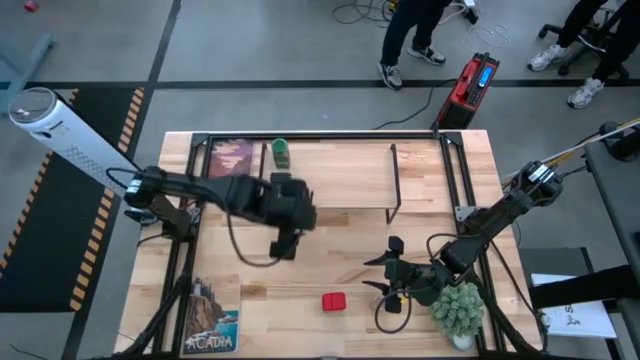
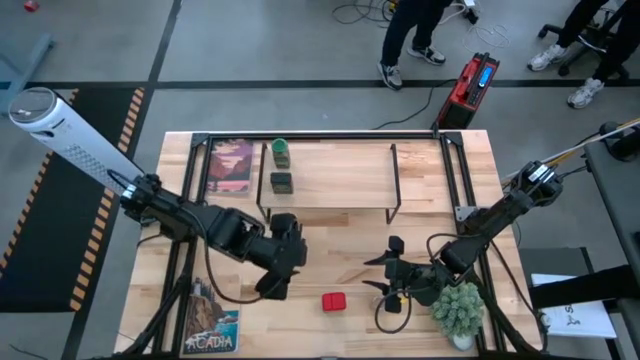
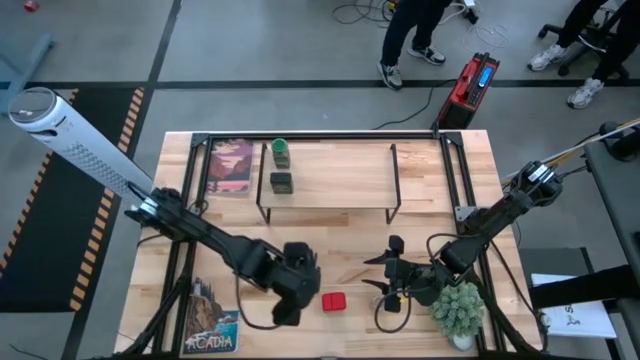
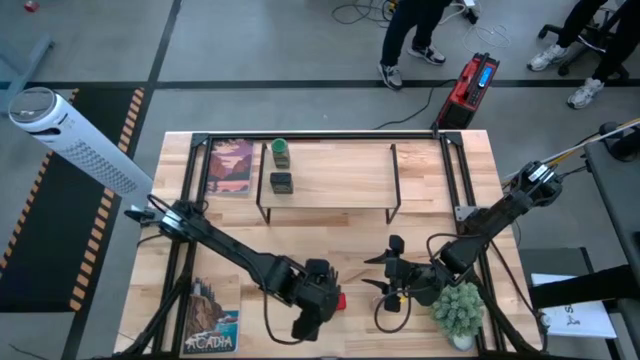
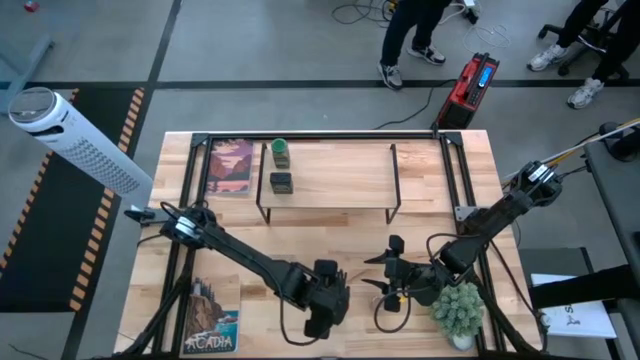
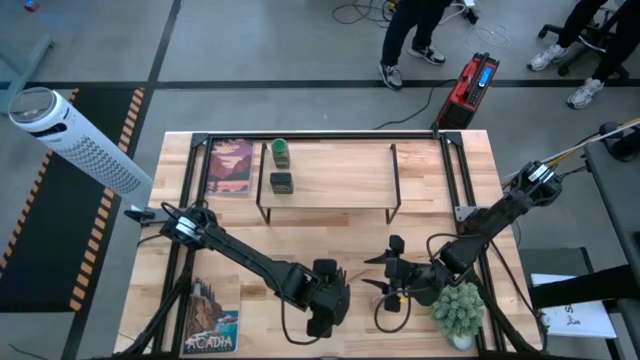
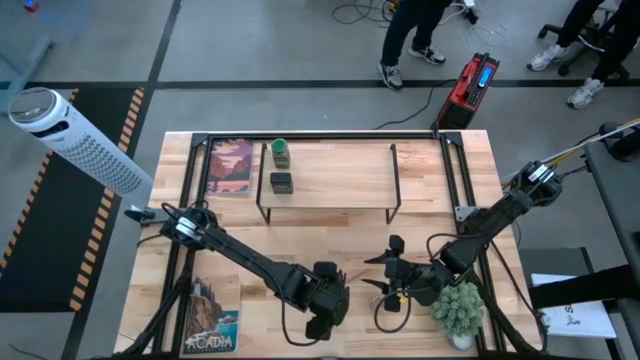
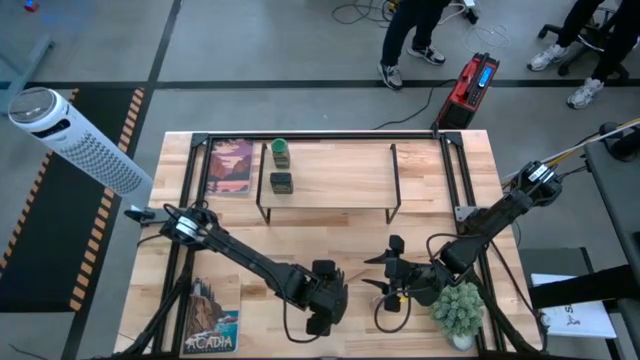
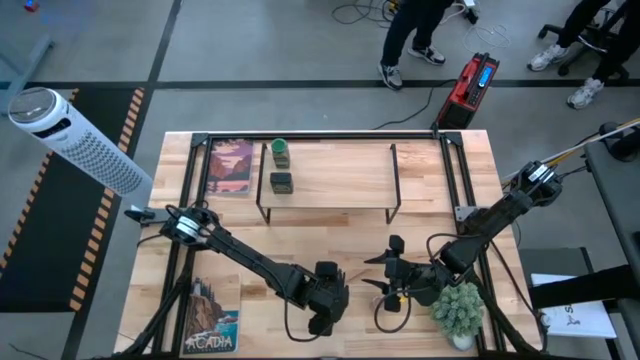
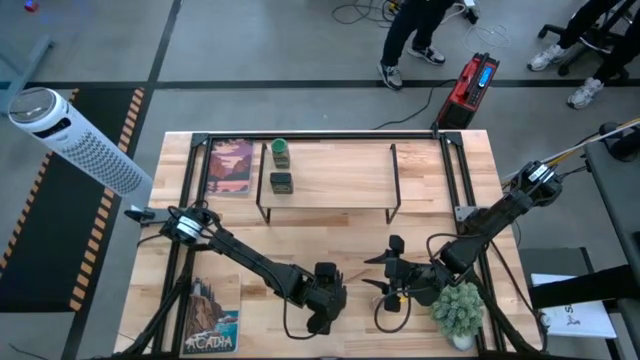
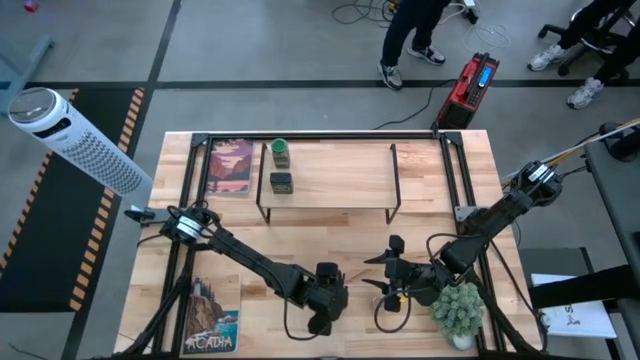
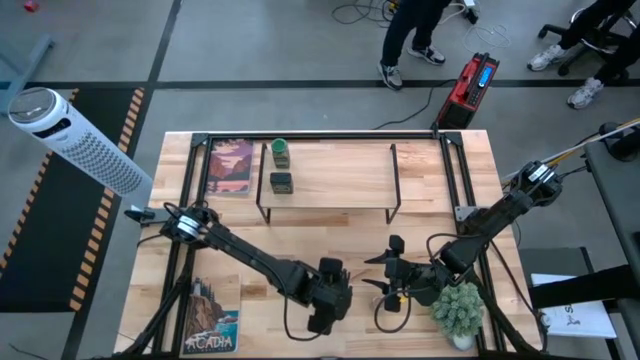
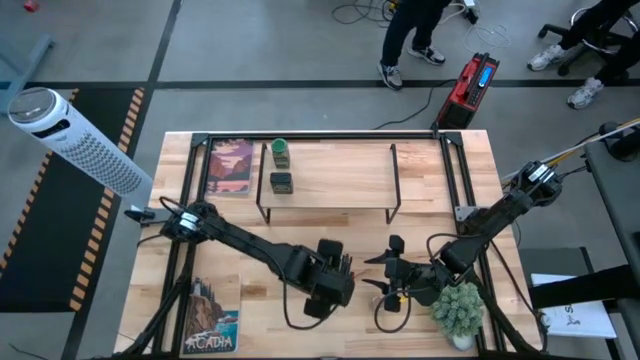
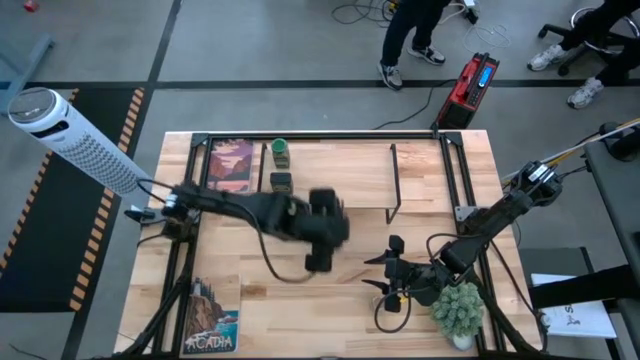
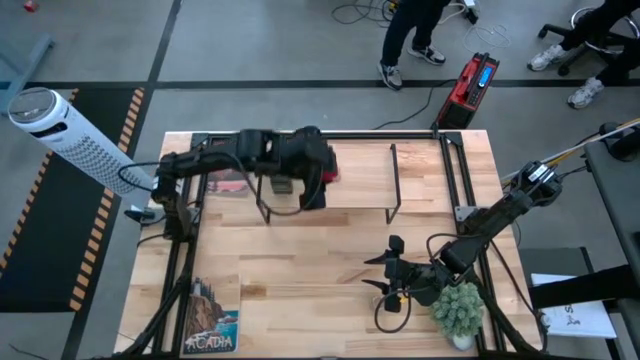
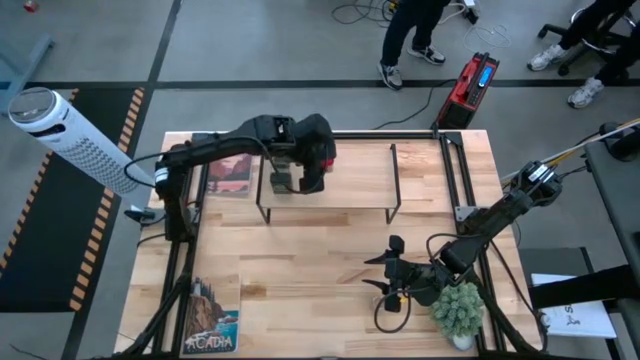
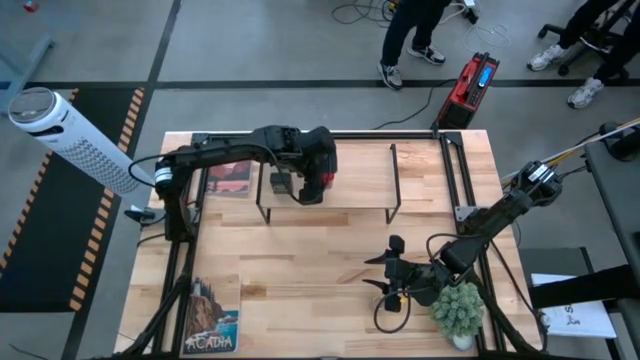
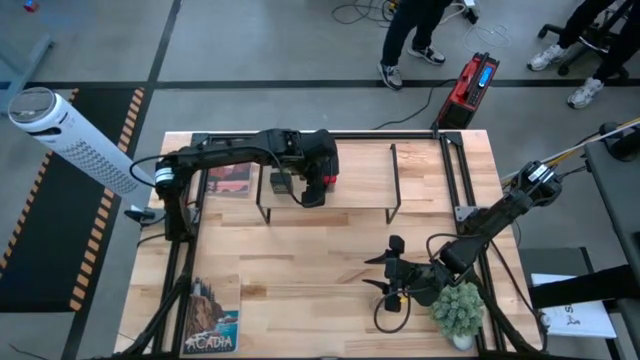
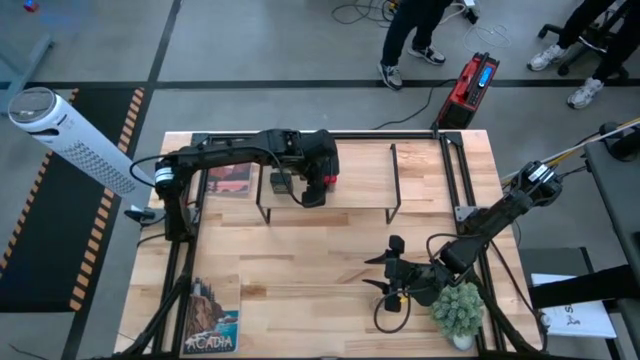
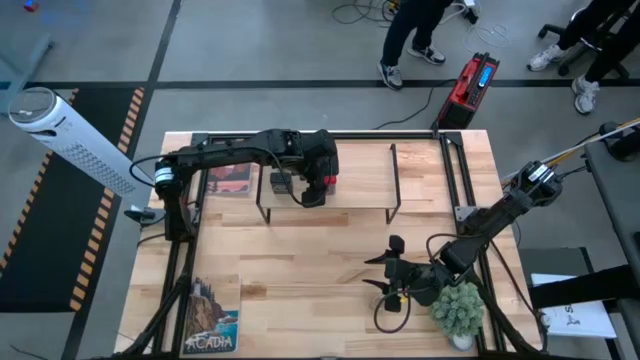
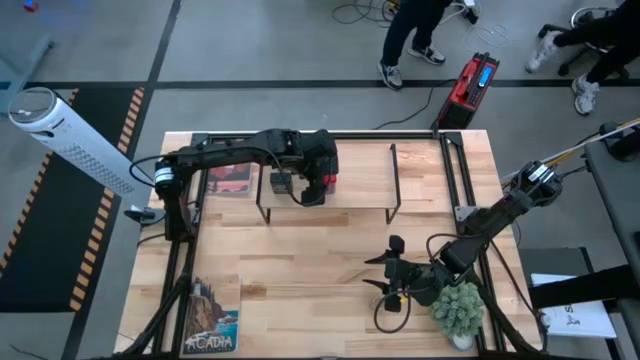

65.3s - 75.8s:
Task: Shelf spices
Put the red seasoning can on the shelf

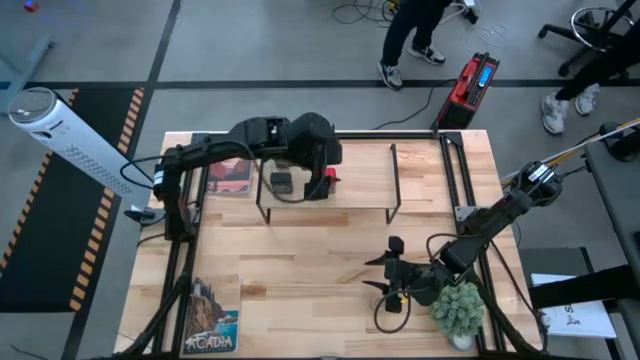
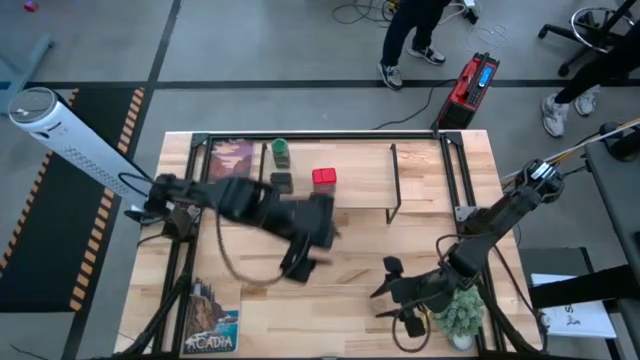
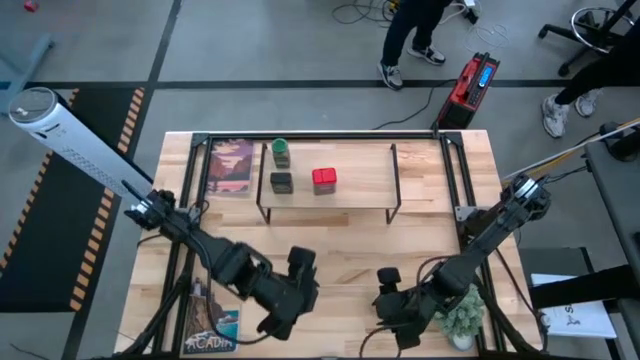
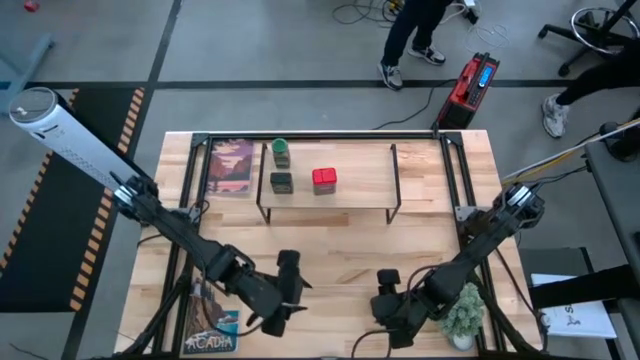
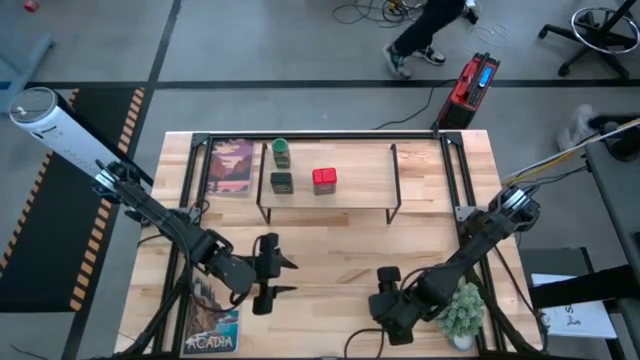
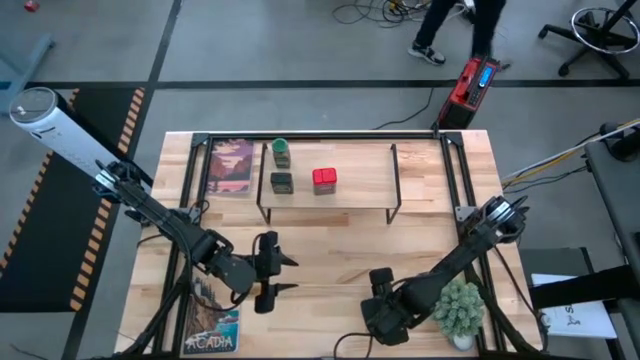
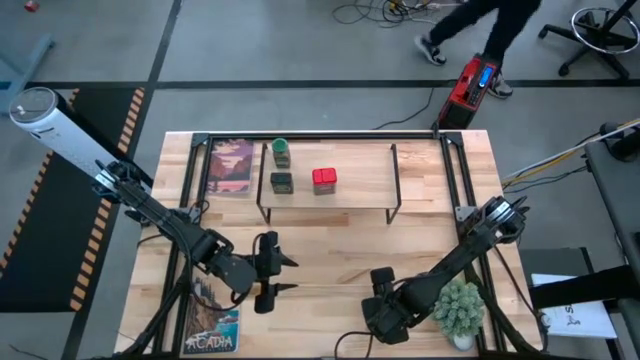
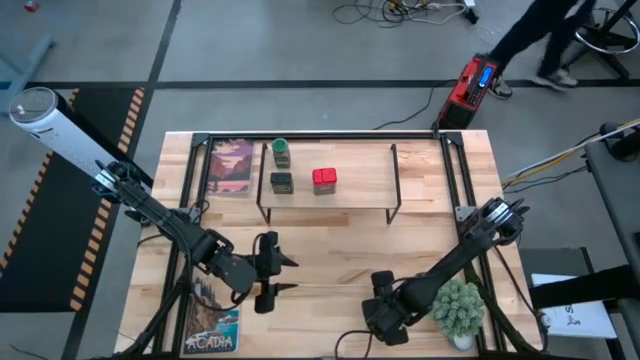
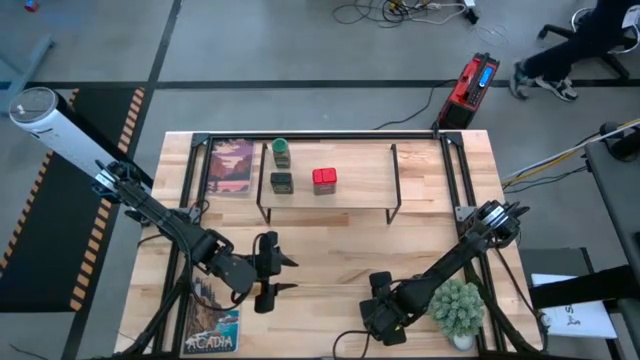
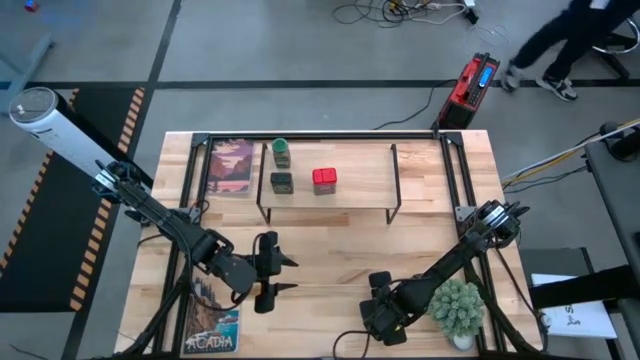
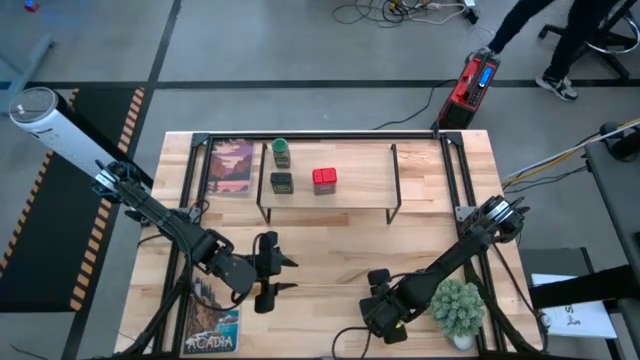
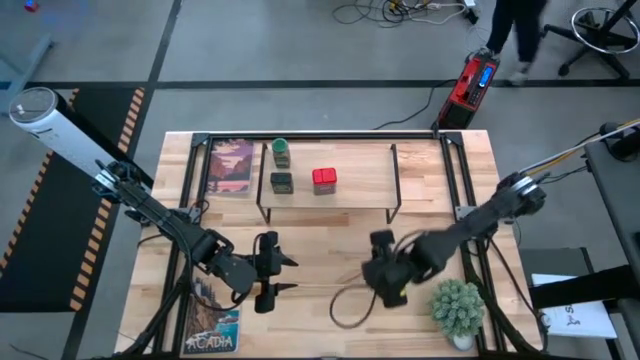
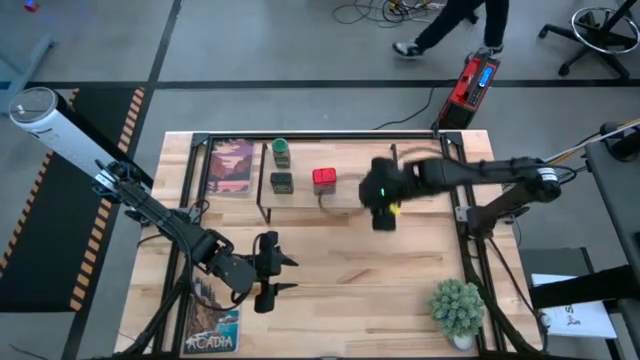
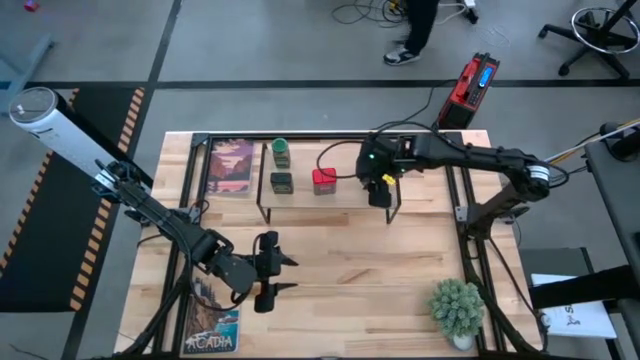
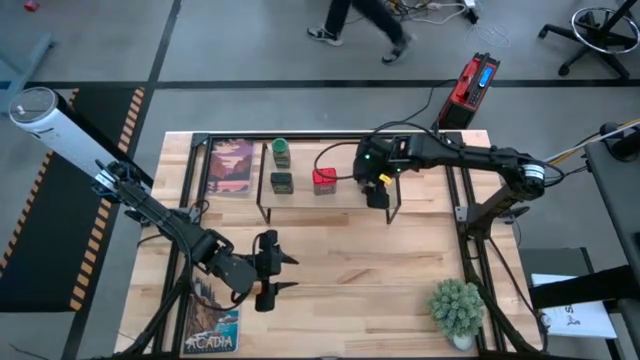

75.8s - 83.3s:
Put the brown seasoning bottle on the shelf

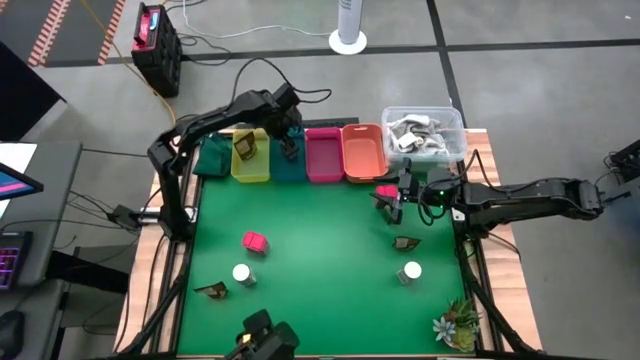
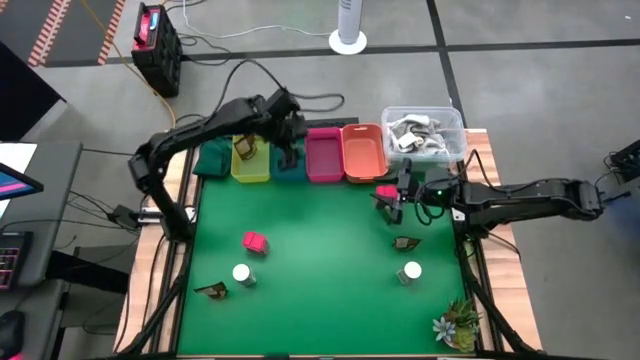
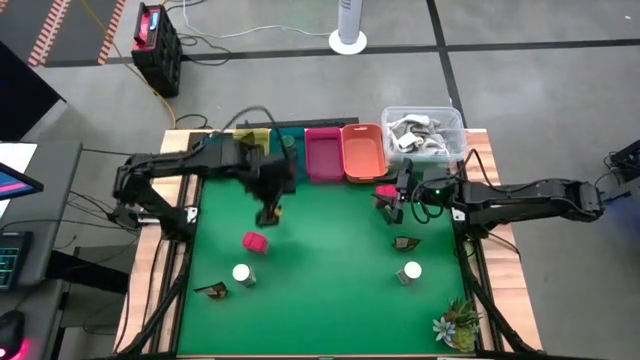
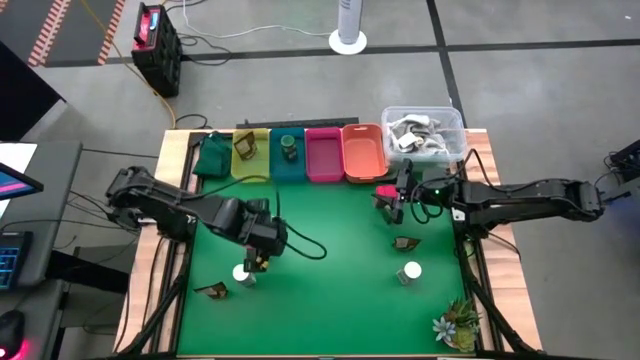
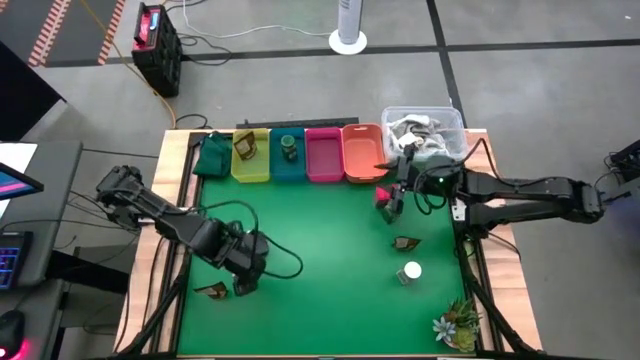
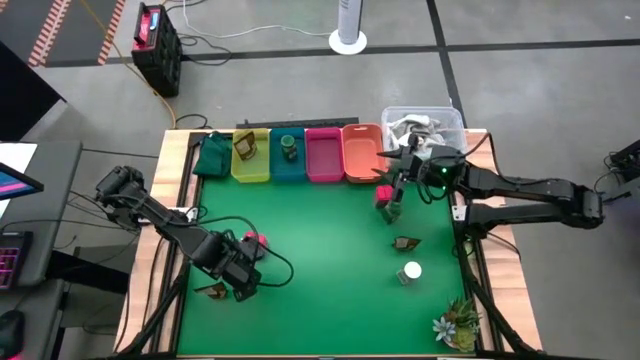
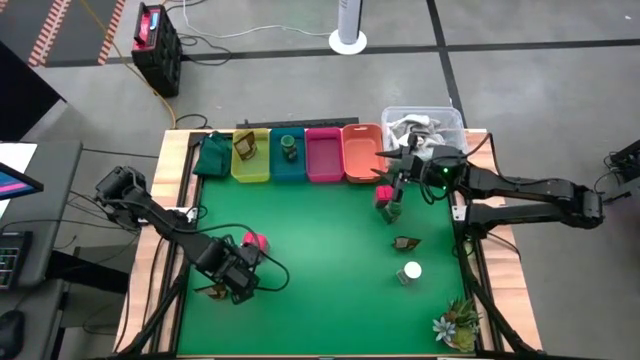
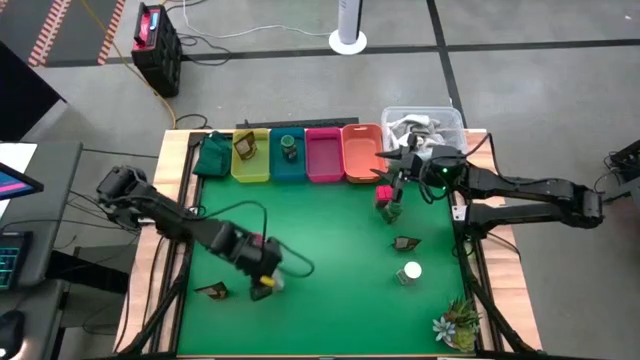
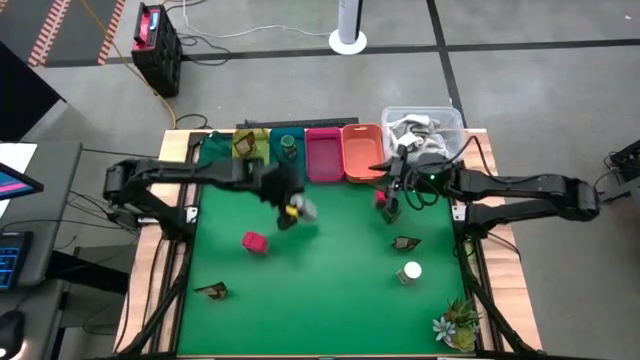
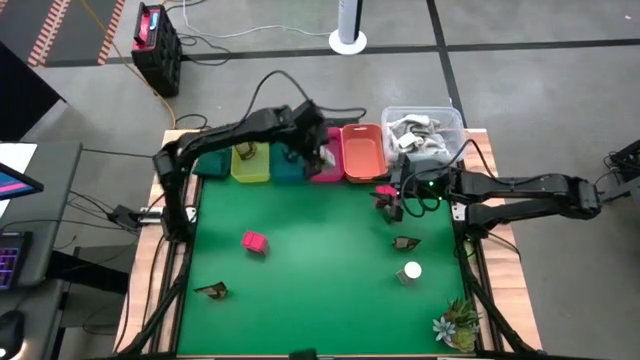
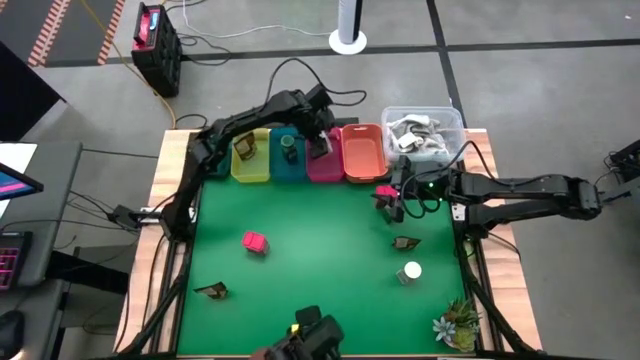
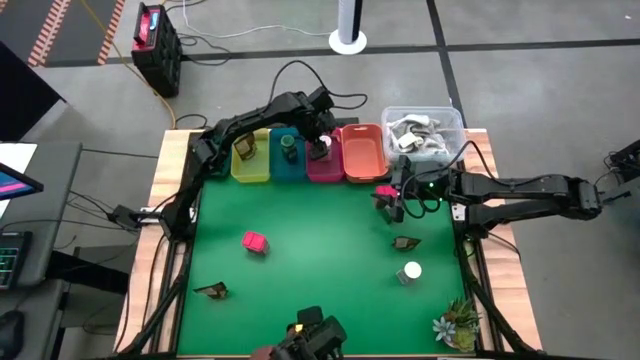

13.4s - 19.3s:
Task: Sort spices by type
Put the left white spice bottle into the red bin
